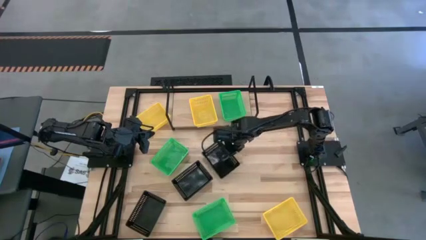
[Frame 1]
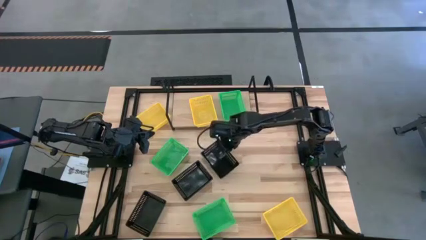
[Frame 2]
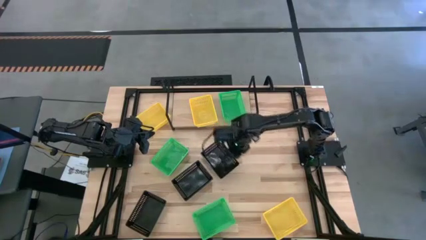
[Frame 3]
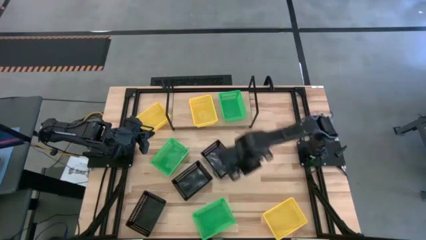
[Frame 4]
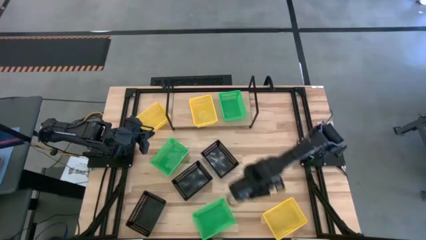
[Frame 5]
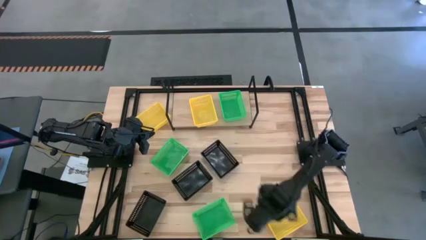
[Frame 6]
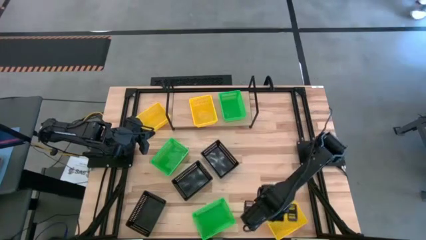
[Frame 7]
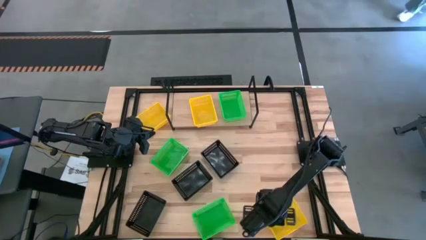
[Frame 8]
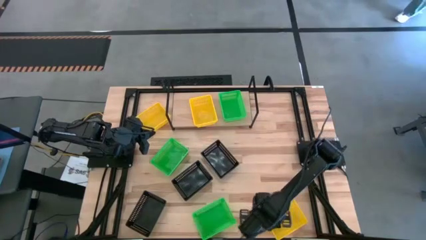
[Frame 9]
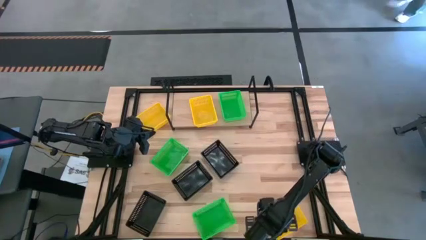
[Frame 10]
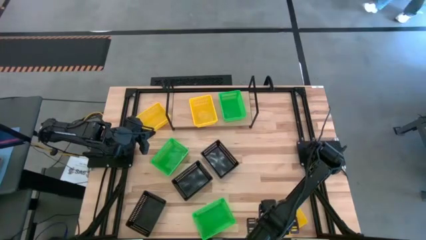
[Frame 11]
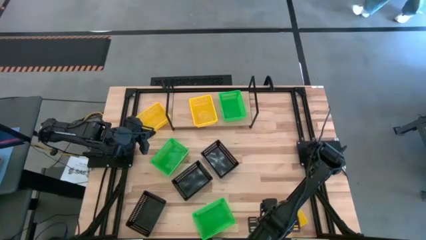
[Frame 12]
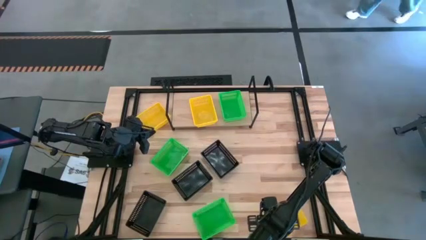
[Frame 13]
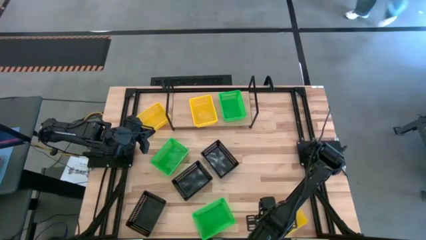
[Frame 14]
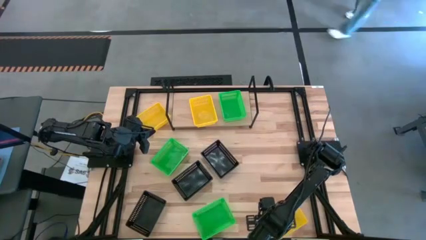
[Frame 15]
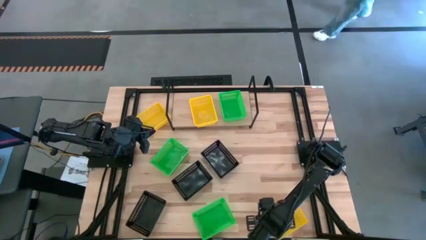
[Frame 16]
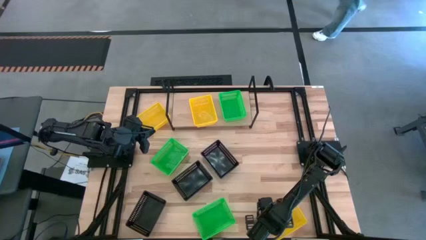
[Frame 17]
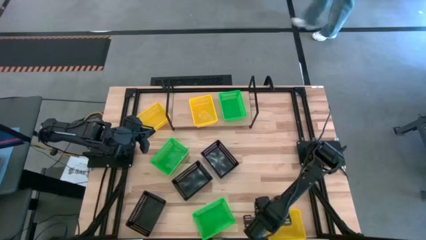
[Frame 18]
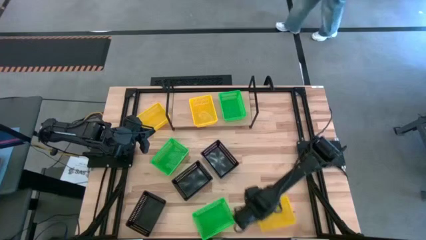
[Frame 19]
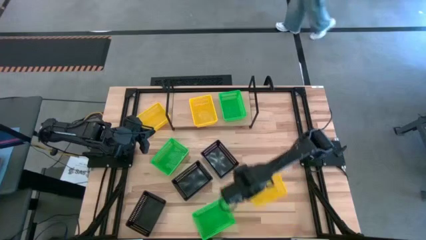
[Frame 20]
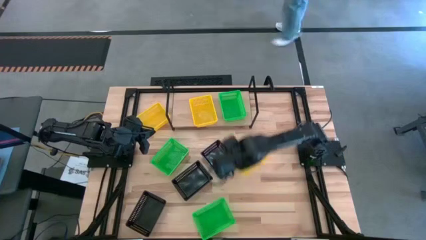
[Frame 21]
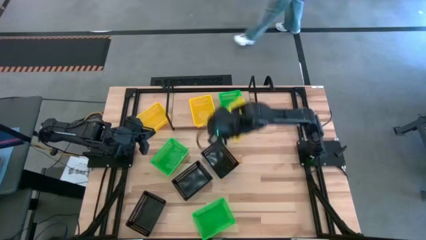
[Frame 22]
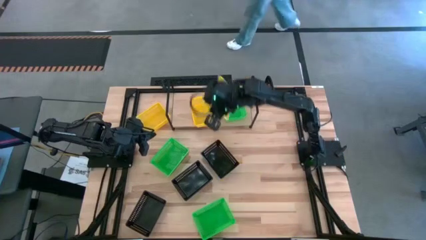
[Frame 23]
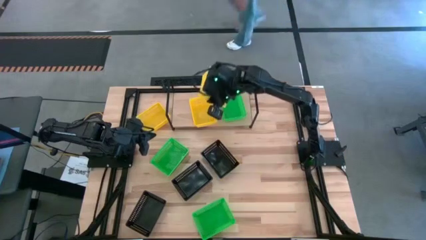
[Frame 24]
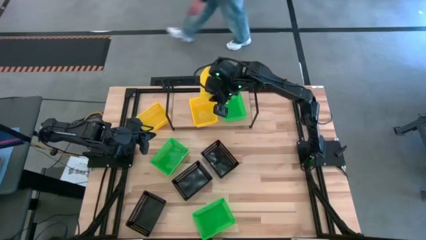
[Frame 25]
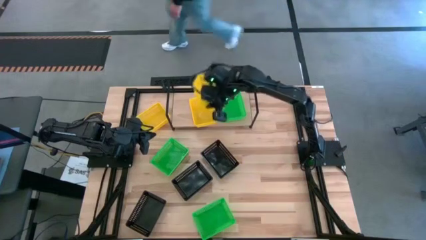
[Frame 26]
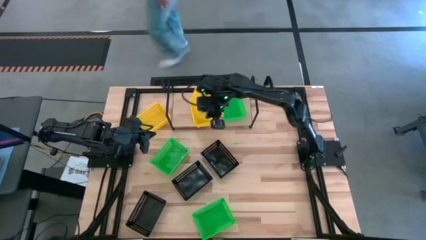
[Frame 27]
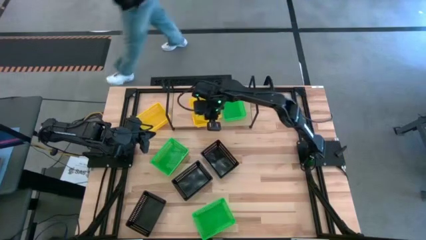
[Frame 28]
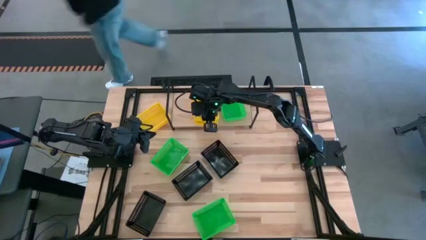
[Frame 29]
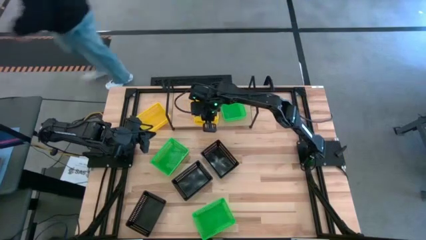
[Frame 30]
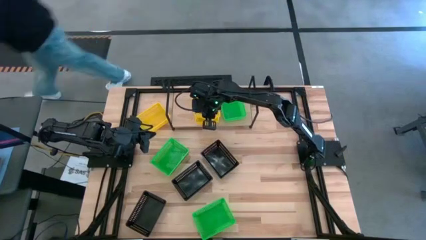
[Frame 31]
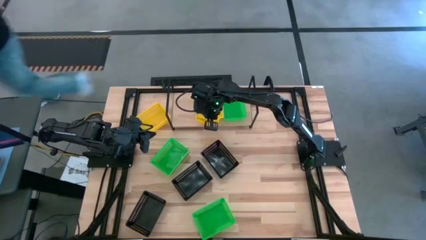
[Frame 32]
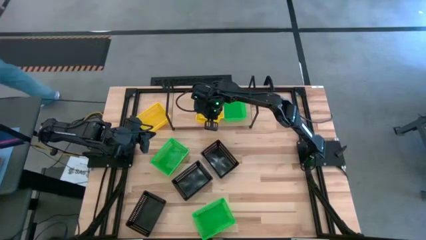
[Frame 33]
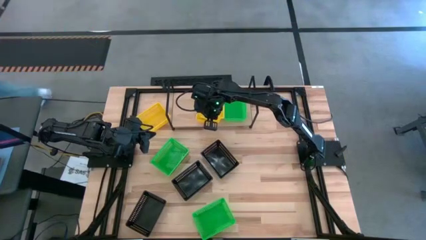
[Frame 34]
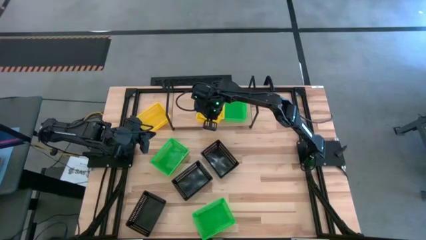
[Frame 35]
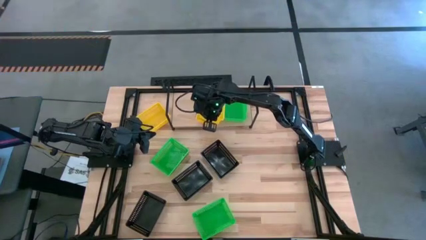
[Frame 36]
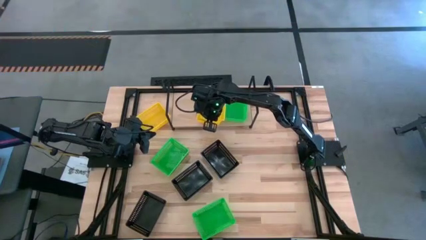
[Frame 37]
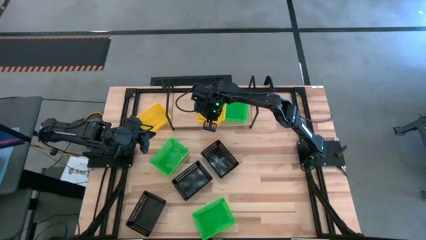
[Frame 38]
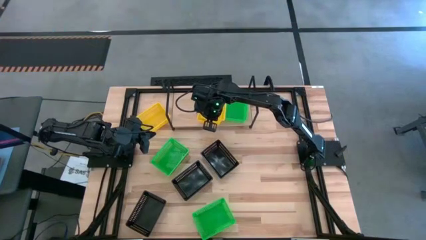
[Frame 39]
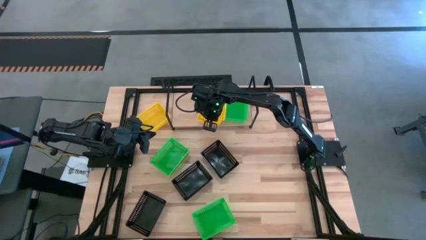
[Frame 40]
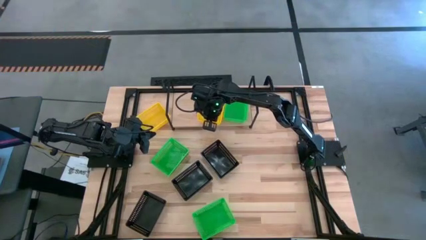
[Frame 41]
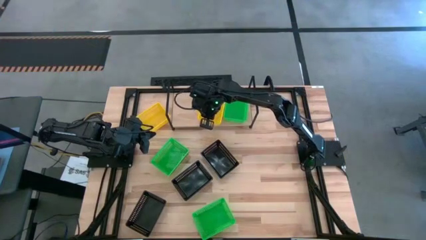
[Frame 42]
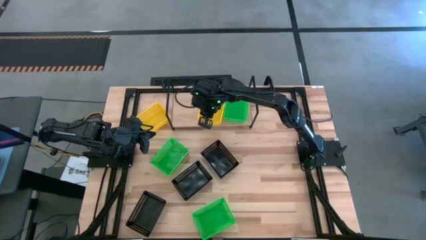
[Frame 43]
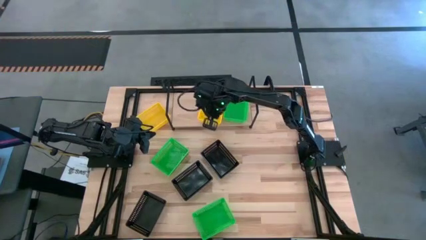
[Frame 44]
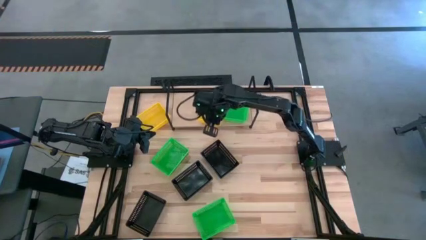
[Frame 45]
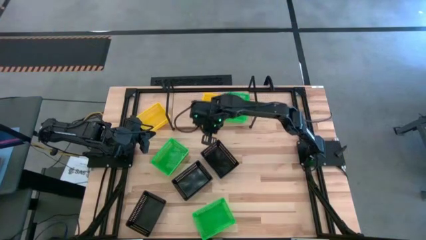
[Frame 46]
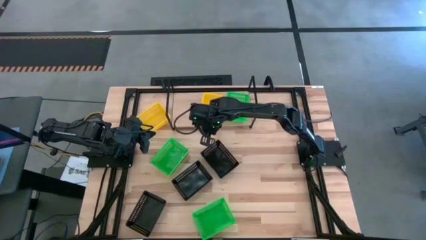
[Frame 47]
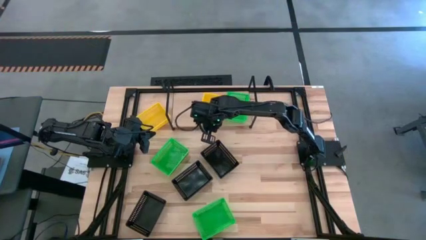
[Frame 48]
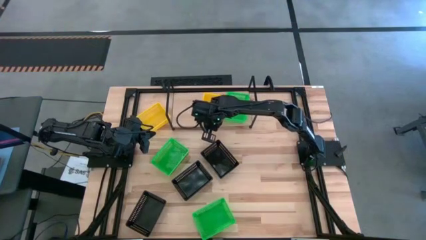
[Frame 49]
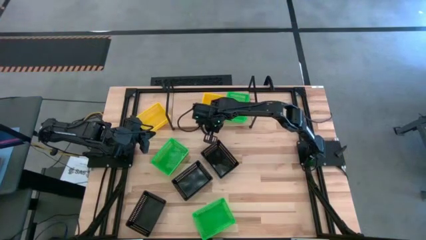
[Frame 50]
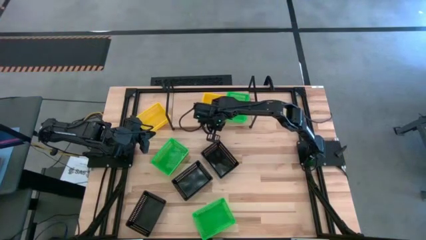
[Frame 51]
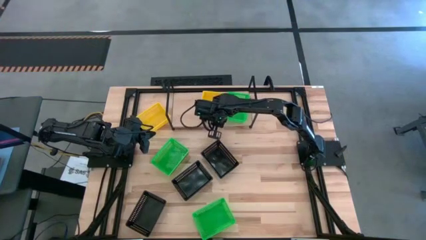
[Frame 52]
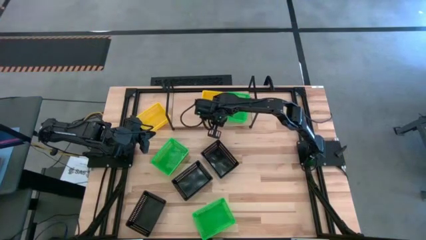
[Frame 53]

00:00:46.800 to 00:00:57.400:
Task: Stack baskets on shelf by color
Stack the bottom yellow bin on top of the yellow bin on the shelf

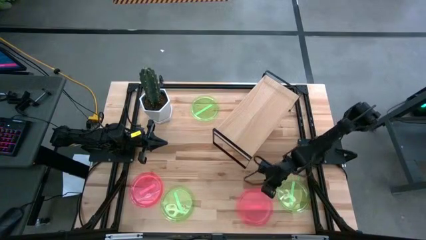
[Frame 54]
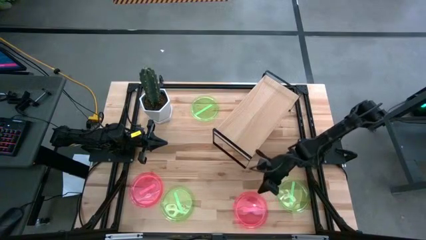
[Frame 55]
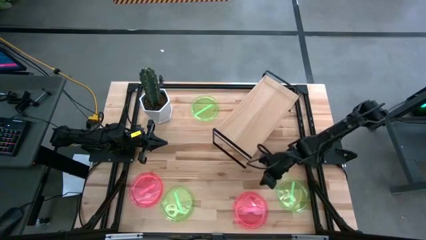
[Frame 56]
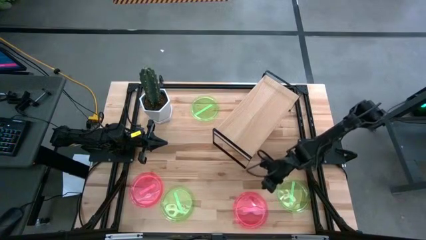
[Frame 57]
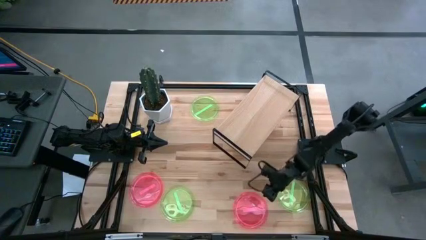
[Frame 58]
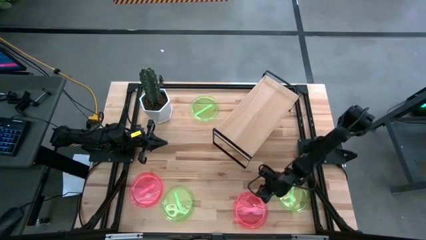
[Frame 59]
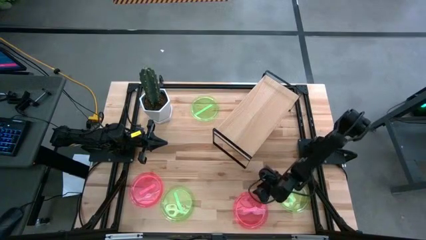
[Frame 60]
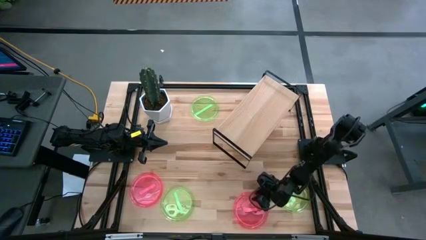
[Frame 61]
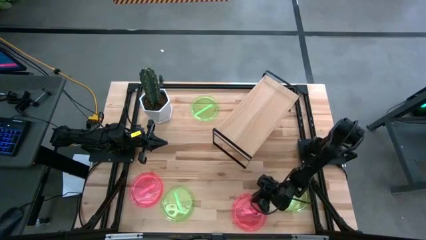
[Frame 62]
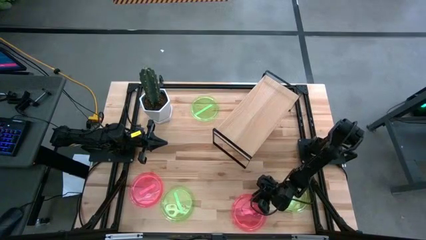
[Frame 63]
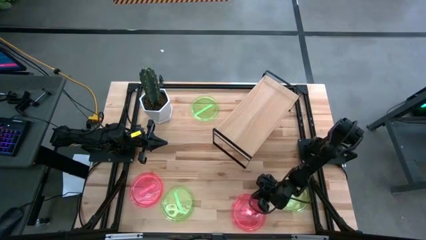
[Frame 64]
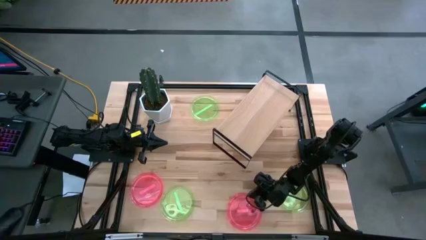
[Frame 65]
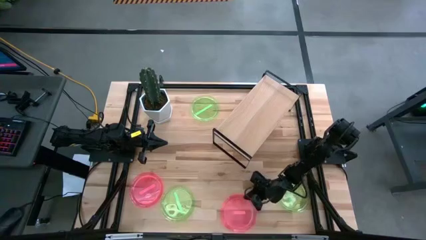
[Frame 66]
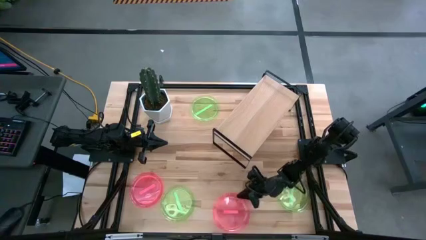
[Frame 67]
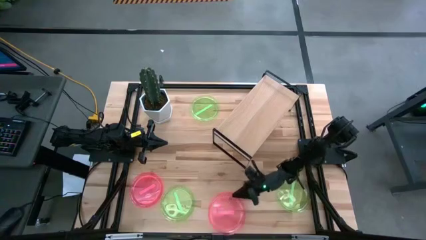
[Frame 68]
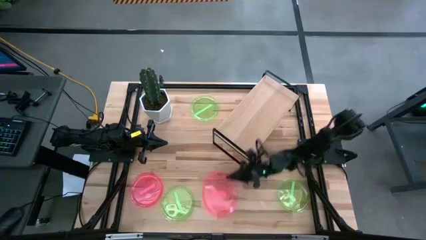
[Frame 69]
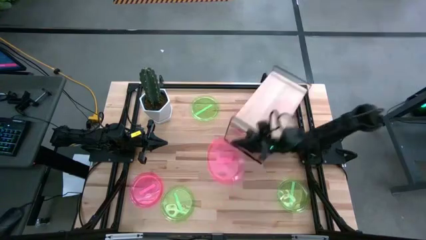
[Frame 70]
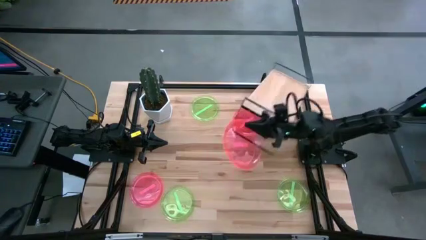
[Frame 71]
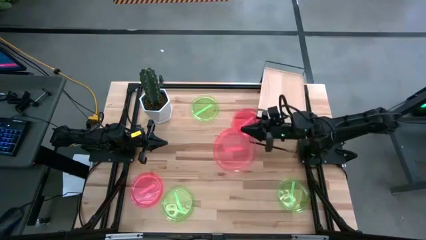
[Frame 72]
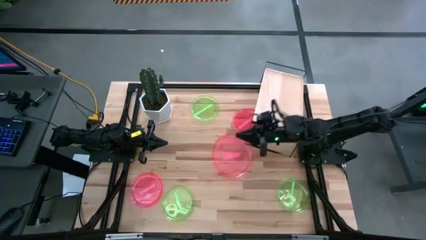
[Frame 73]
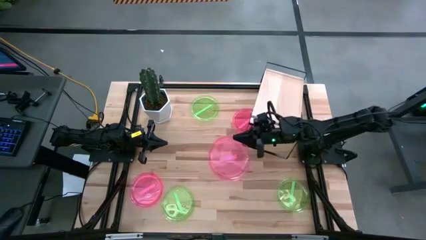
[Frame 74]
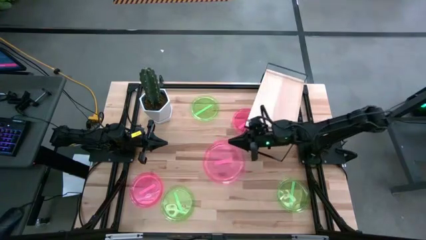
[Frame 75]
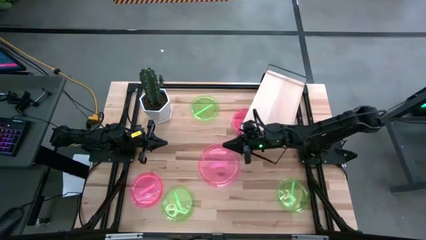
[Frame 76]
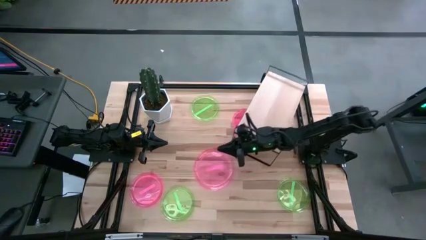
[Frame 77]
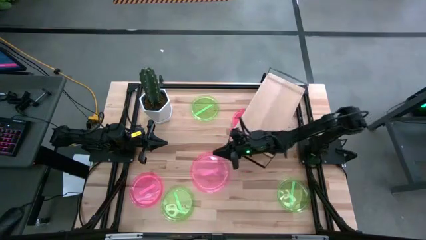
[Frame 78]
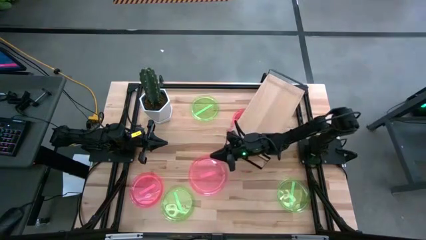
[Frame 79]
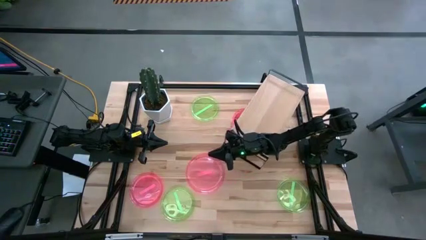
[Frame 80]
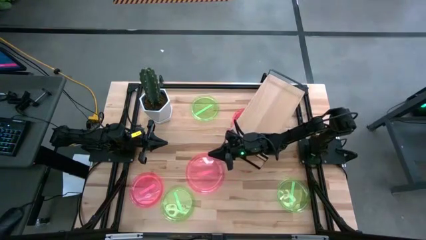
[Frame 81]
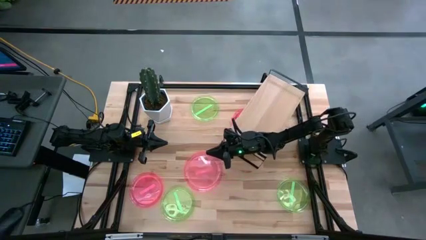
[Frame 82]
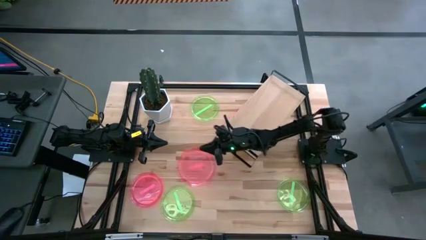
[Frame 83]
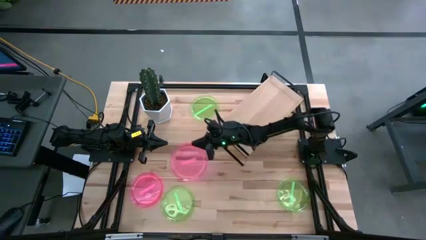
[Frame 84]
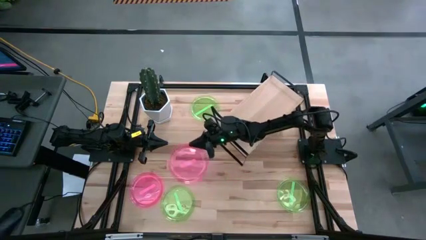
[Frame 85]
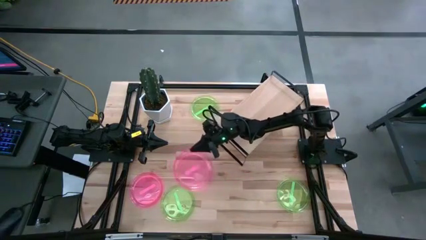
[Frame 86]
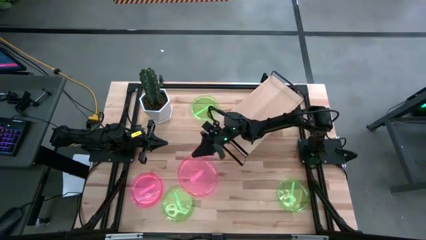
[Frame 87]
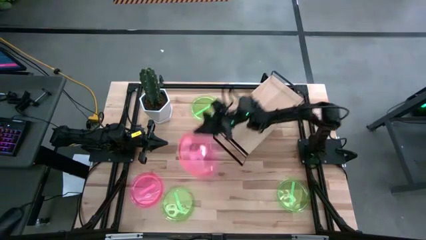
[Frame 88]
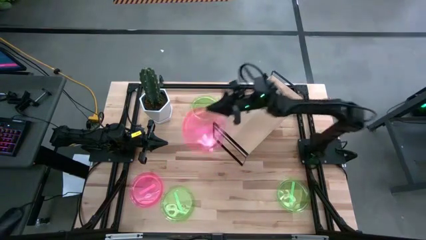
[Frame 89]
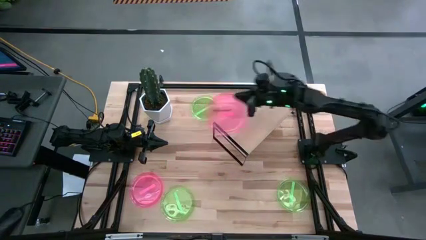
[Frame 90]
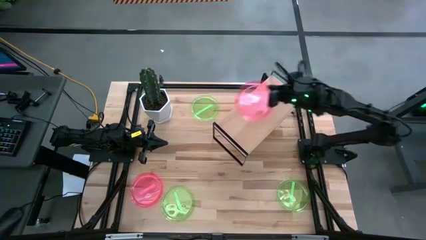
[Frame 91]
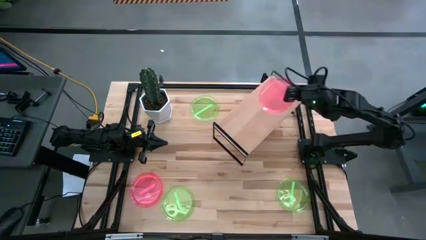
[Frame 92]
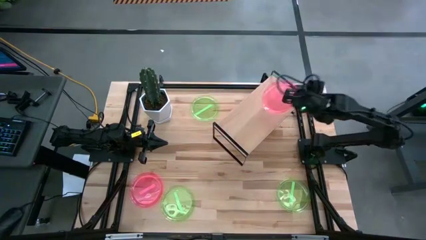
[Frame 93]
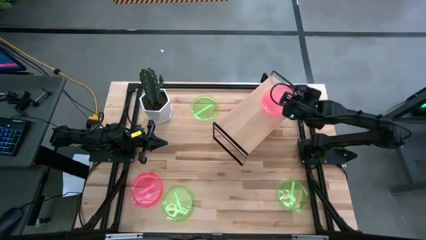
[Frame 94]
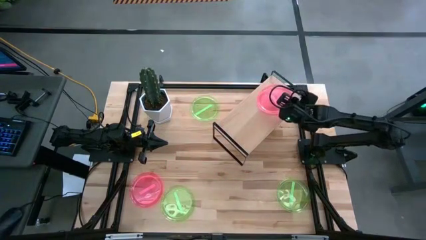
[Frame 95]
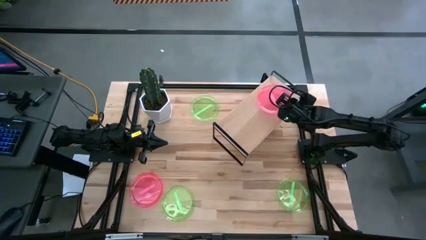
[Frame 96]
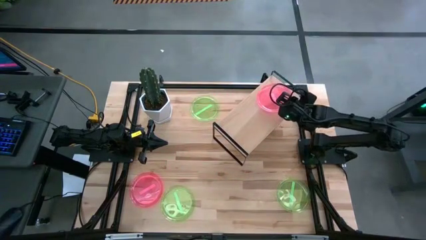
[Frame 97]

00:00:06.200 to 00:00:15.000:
Task: Place and stack plates onto a shelf
Put the bottom right pink plate on the shelf
